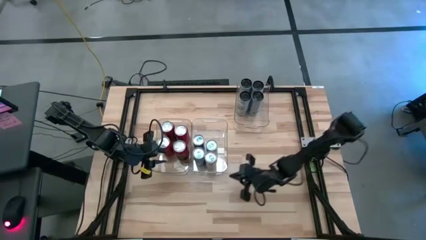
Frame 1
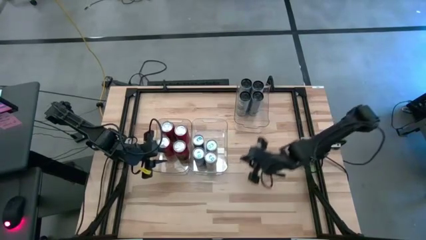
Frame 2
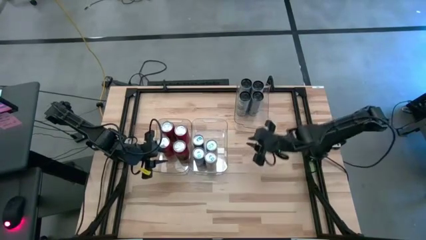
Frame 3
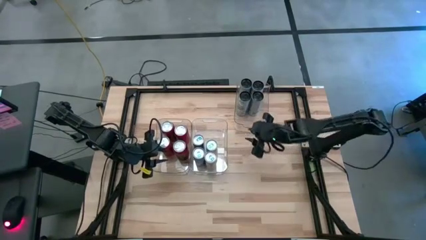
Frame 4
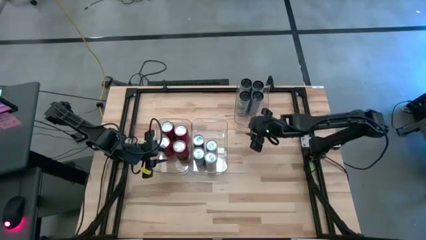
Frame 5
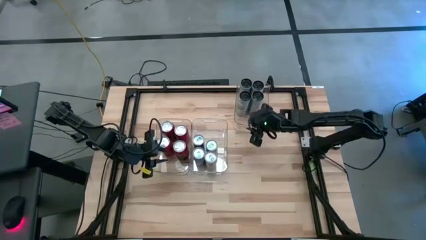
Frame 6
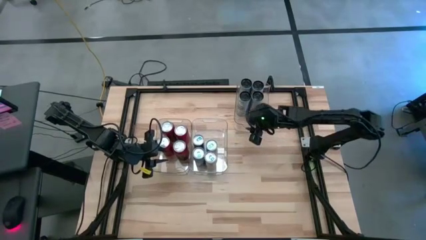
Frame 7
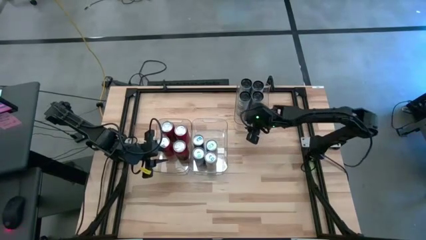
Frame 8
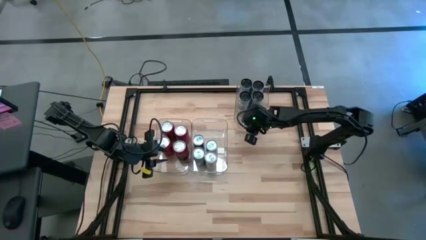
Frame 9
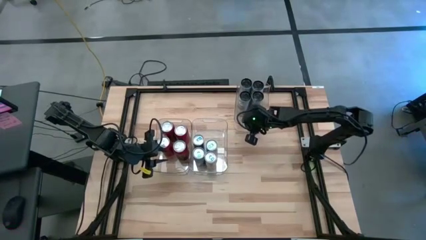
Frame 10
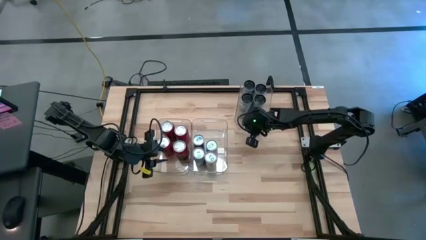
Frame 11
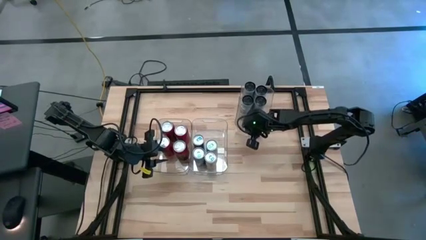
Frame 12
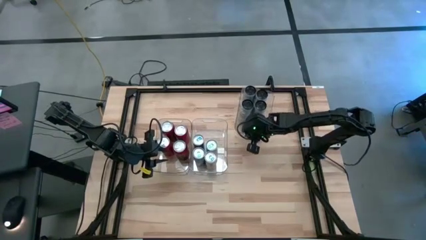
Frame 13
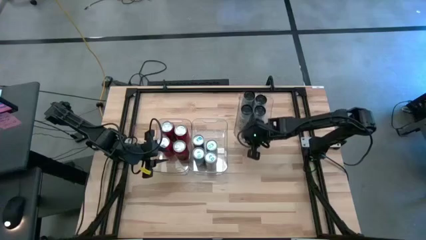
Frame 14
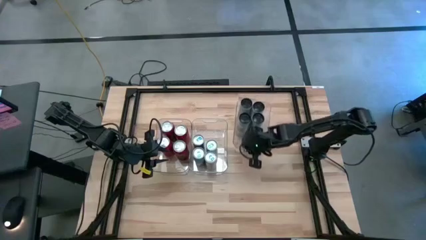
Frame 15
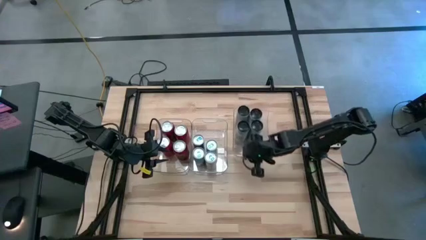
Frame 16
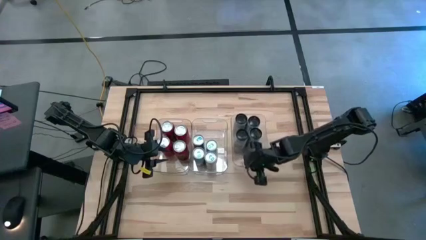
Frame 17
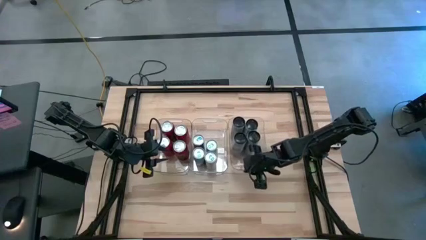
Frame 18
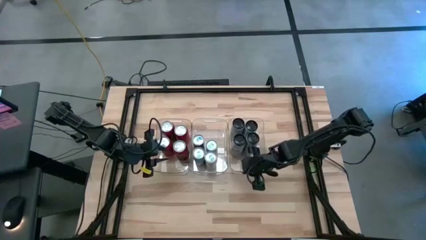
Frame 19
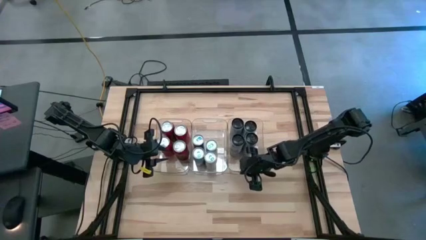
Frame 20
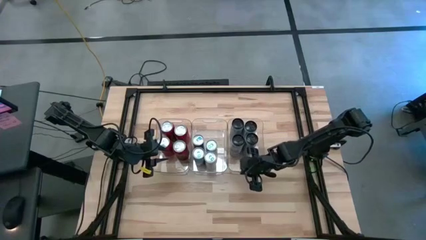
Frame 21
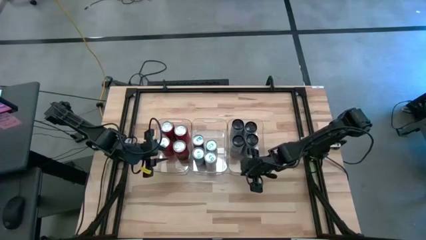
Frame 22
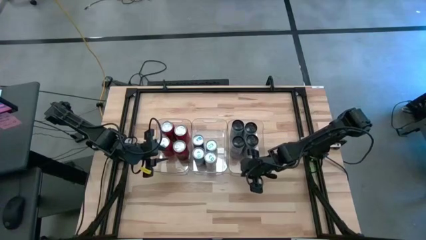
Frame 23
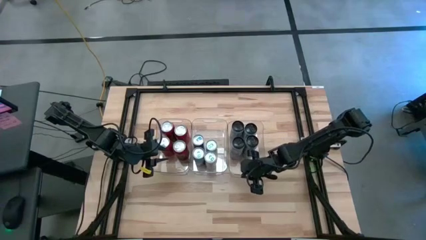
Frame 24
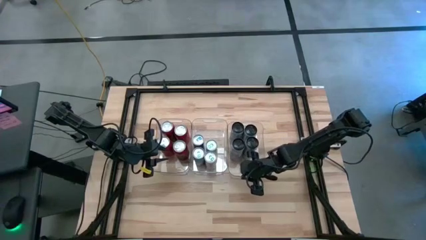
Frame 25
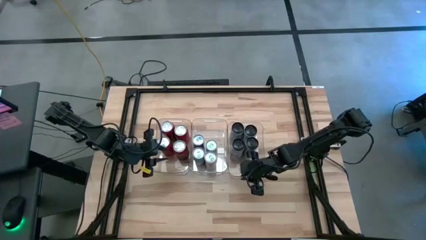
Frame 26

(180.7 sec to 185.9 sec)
Task: Sort soda cans
Move the top right transparent bin to the middle right of the table

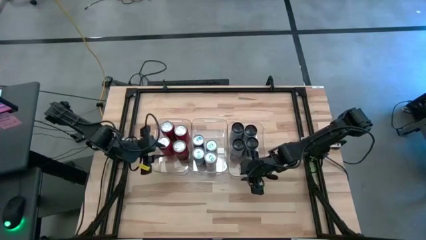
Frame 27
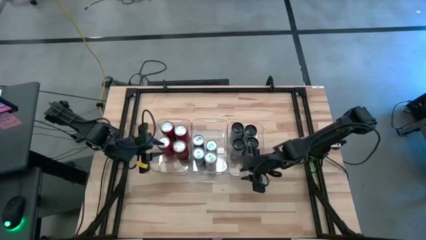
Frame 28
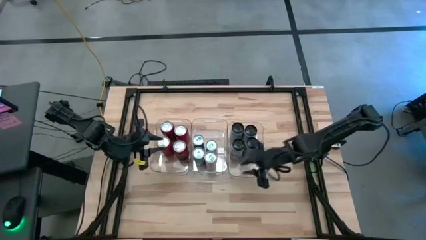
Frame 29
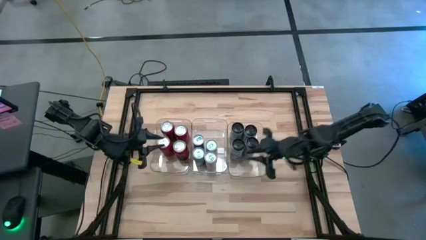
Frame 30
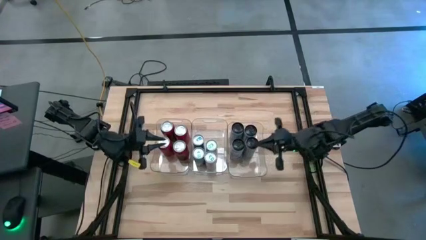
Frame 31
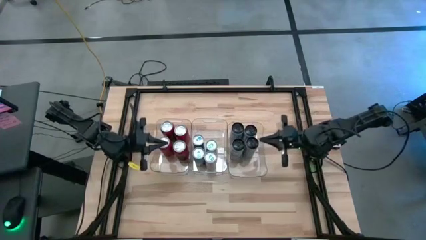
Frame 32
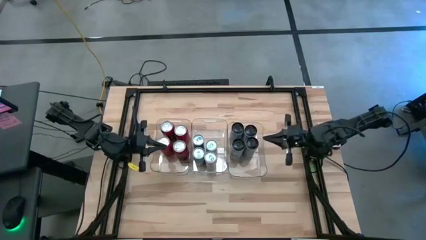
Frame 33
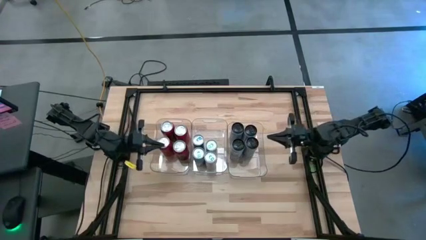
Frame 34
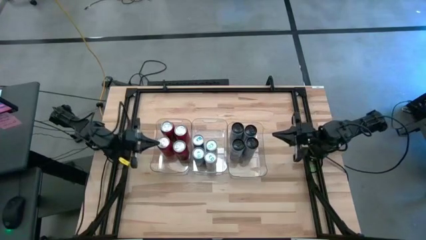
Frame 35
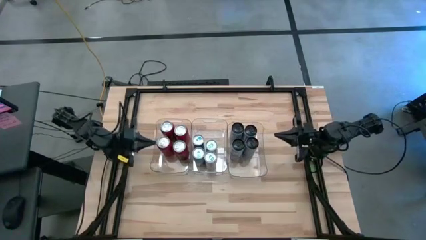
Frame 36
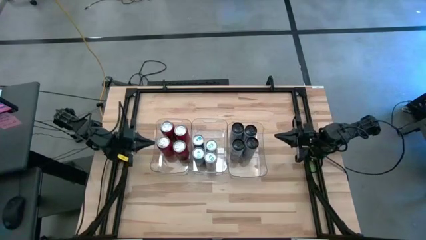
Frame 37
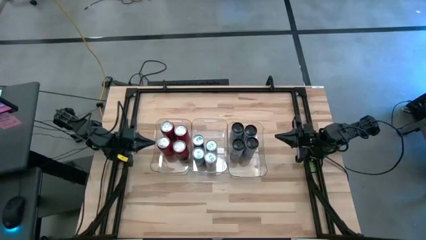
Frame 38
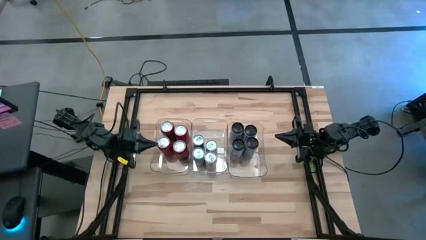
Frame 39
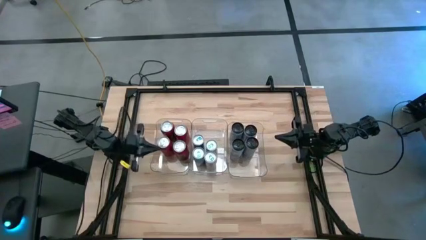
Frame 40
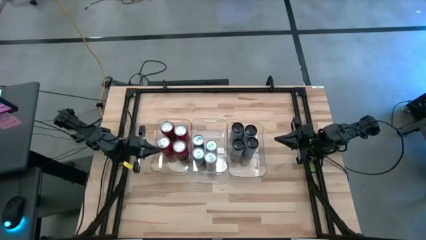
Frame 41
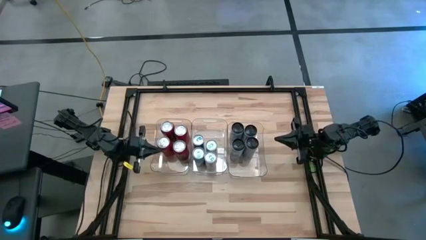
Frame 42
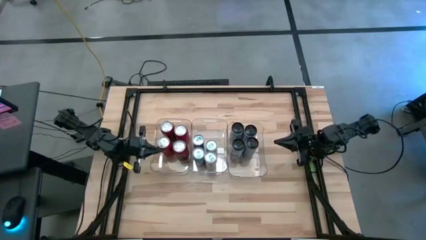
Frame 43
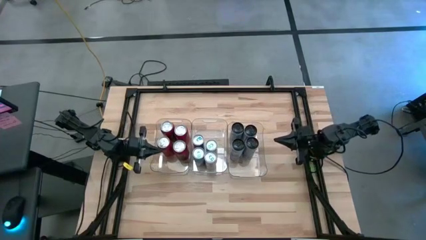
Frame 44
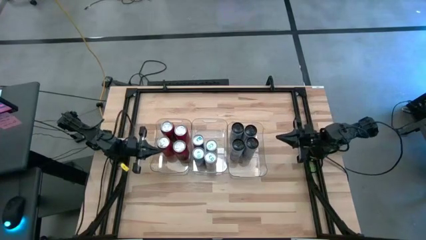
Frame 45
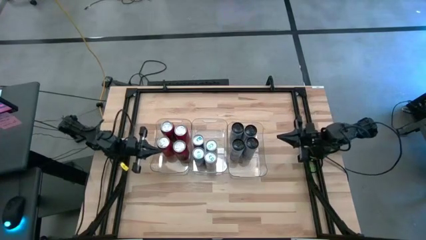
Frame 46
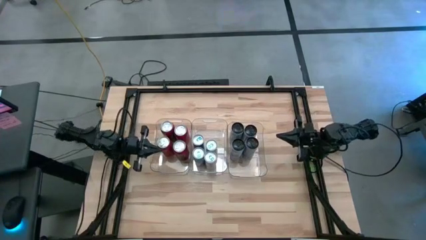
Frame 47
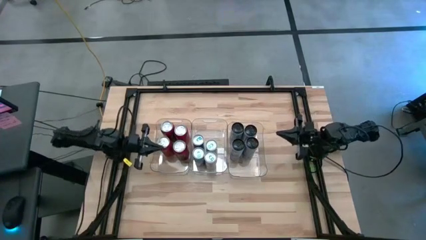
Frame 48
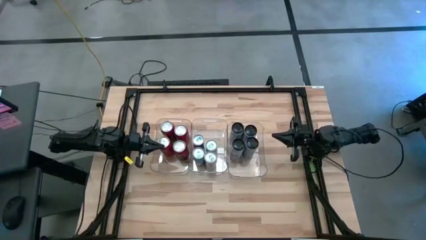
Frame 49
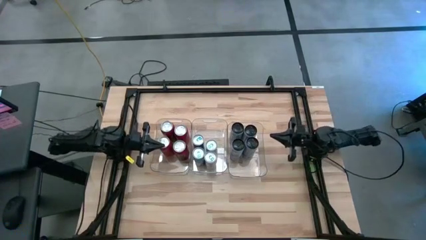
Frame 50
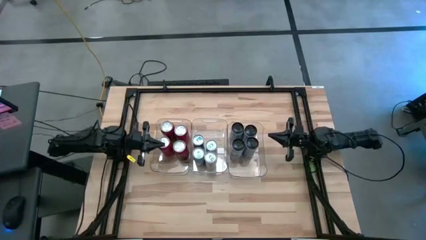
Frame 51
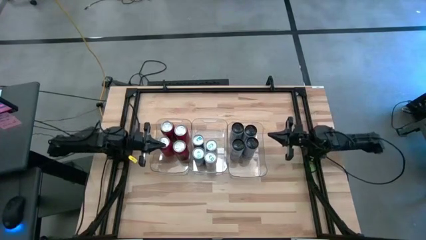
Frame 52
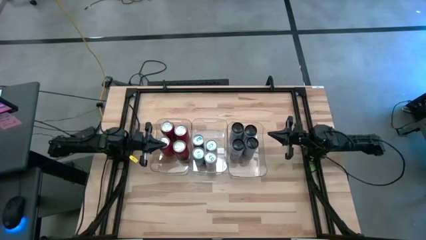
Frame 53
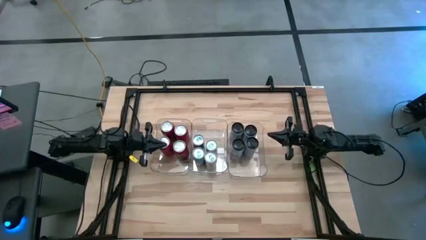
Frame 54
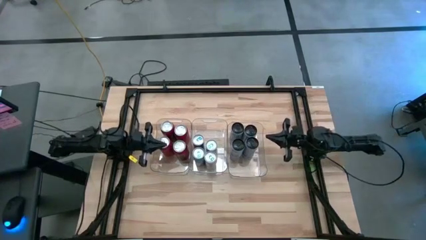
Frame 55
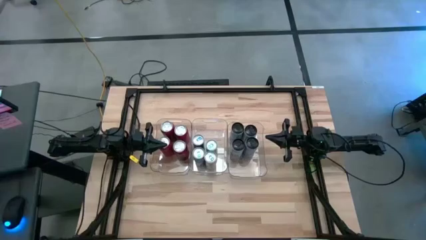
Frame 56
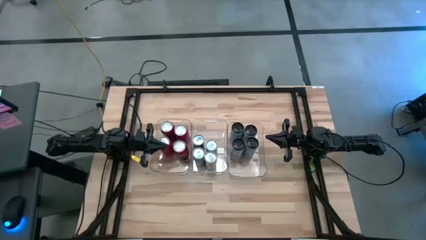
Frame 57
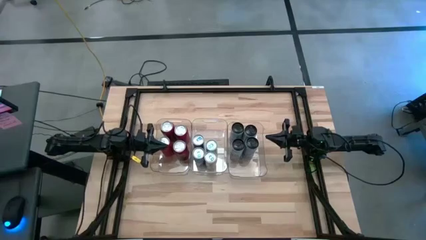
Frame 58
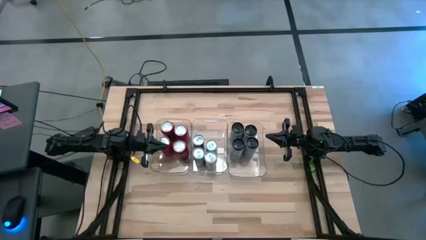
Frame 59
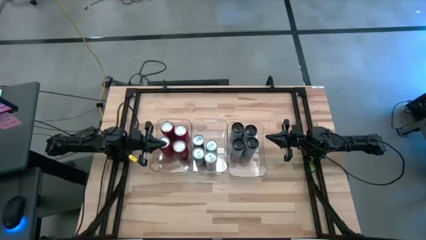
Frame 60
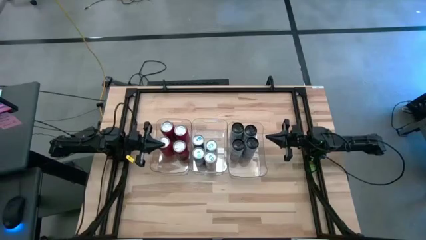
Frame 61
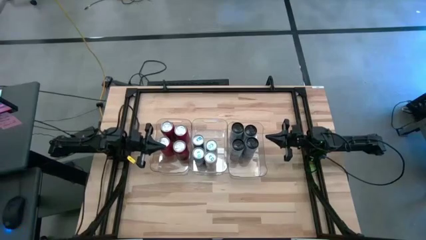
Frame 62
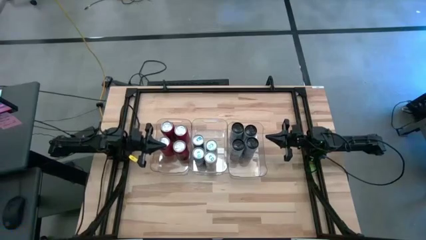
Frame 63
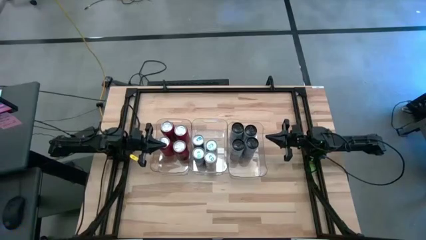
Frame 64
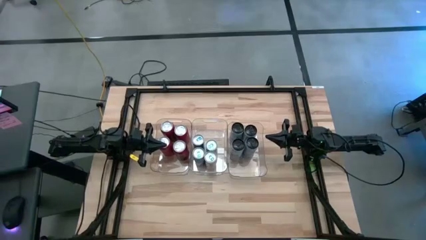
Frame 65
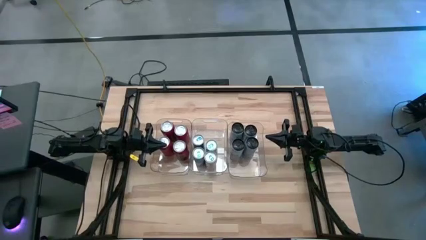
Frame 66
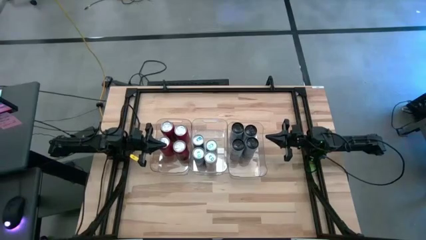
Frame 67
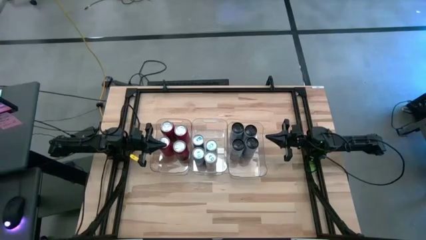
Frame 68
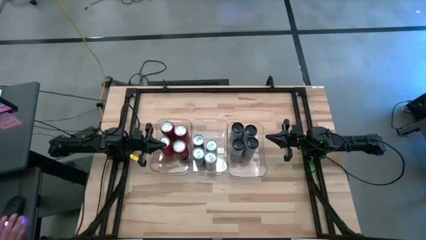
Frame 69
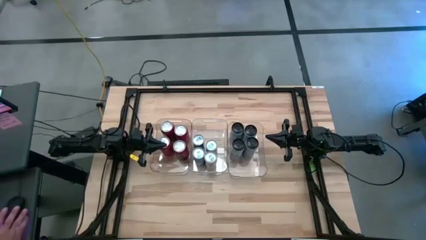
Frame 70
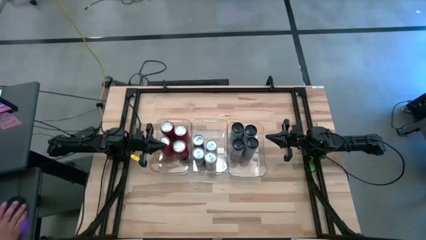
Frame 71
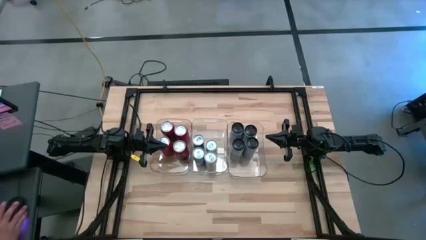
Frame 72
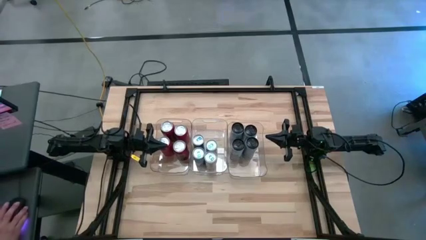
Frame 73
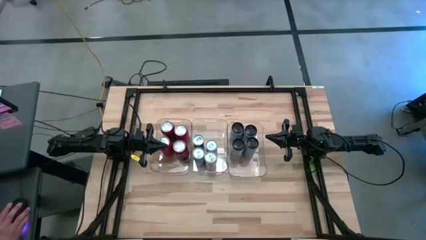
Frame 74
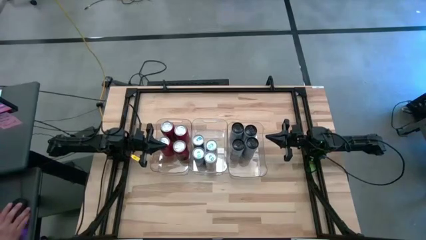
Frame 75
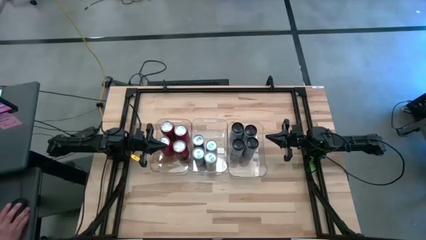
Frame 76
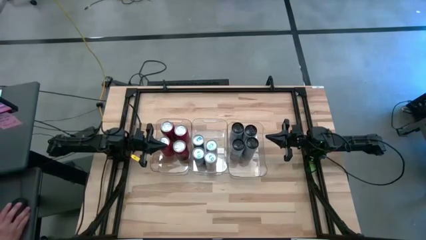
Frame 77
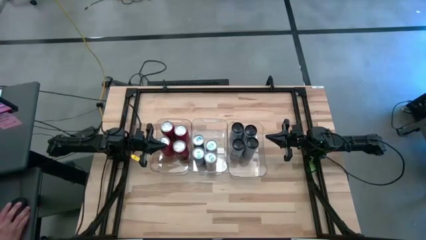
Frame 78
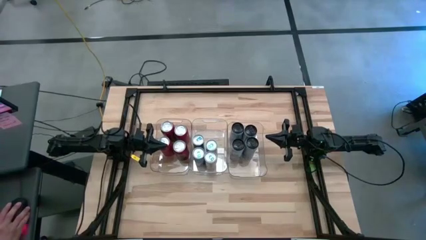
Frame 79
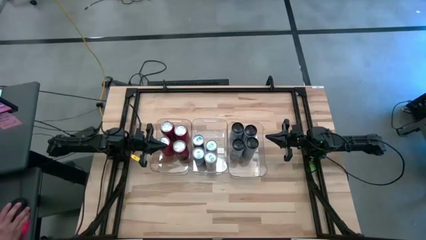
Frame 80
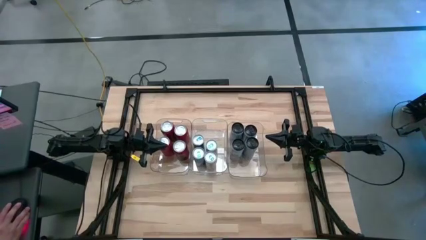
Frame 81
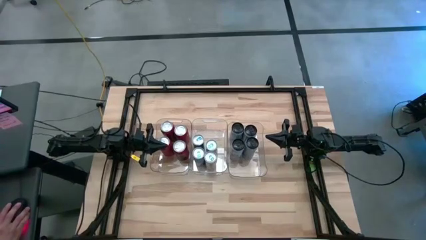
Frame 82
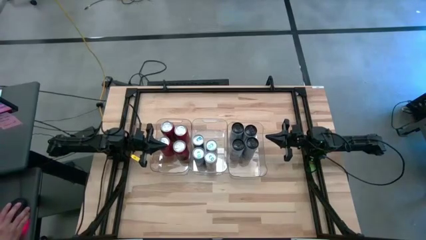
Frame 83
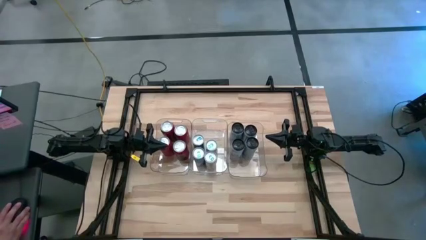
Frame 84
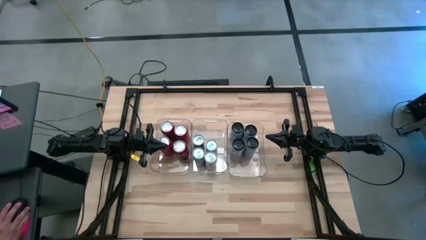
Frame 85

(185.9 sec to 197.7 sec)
Return to Home Position
